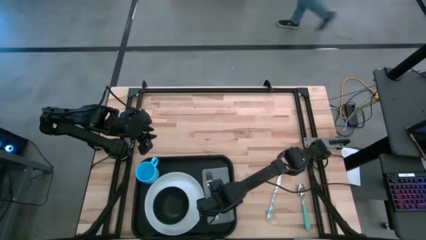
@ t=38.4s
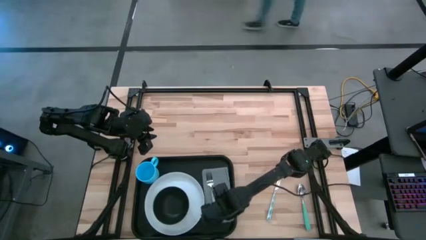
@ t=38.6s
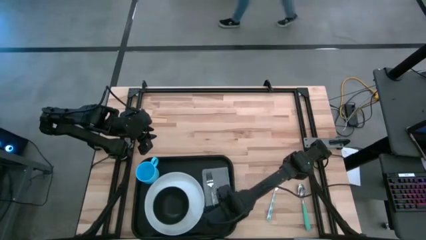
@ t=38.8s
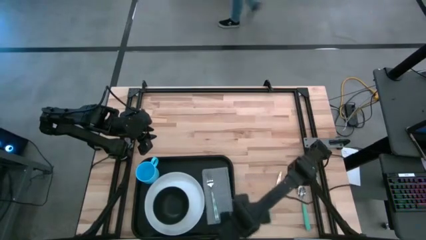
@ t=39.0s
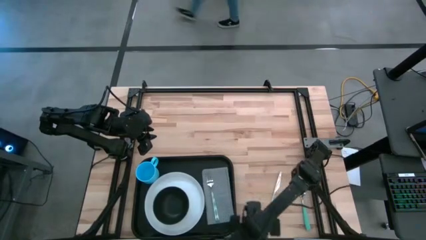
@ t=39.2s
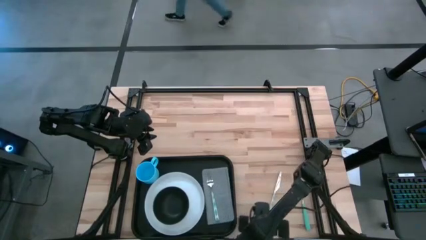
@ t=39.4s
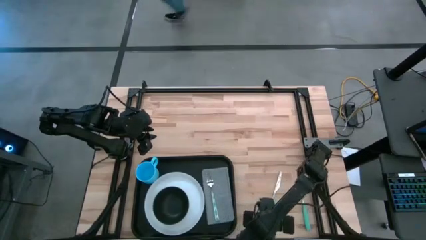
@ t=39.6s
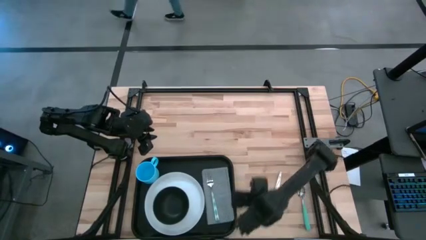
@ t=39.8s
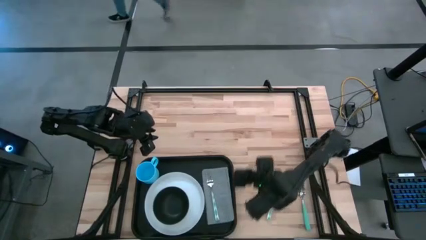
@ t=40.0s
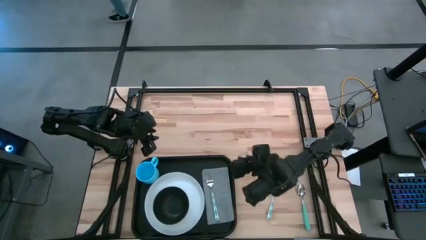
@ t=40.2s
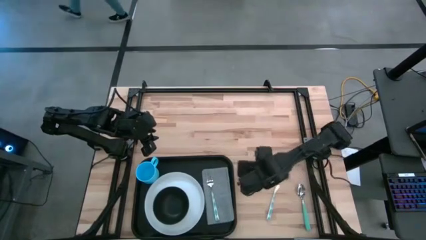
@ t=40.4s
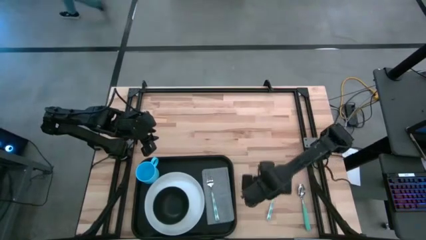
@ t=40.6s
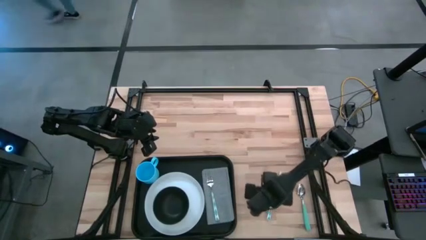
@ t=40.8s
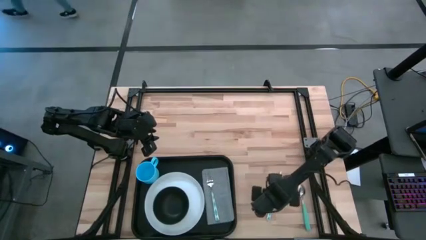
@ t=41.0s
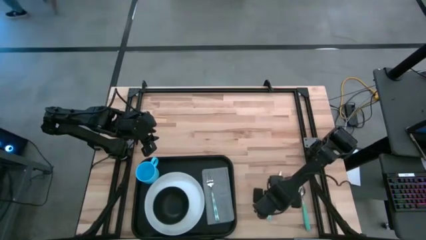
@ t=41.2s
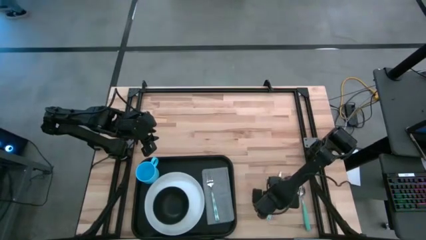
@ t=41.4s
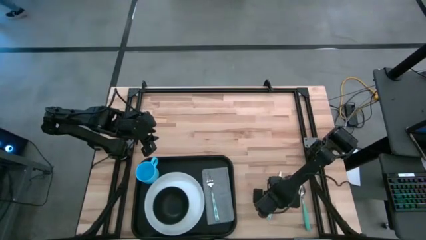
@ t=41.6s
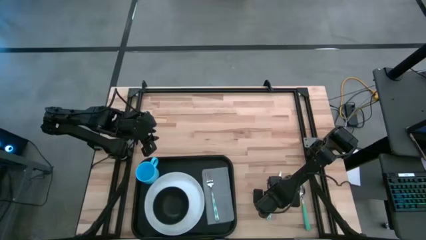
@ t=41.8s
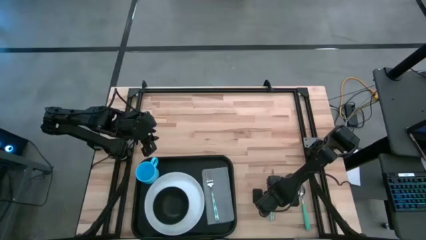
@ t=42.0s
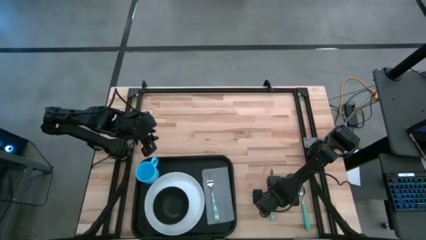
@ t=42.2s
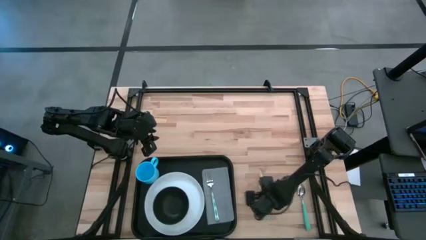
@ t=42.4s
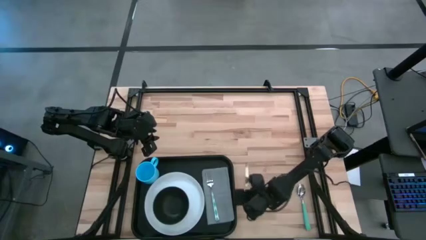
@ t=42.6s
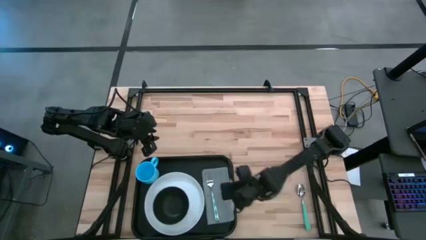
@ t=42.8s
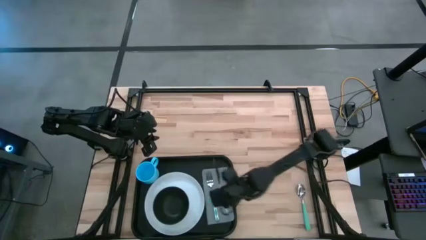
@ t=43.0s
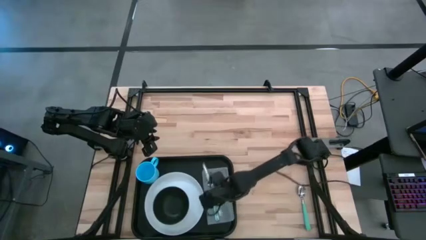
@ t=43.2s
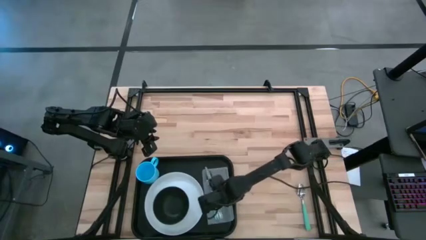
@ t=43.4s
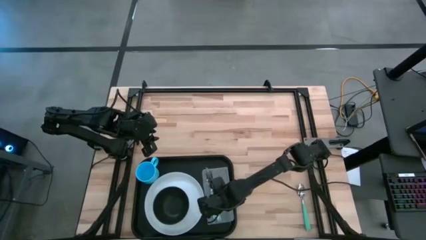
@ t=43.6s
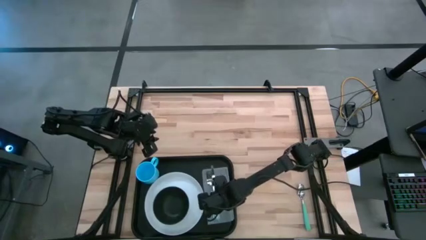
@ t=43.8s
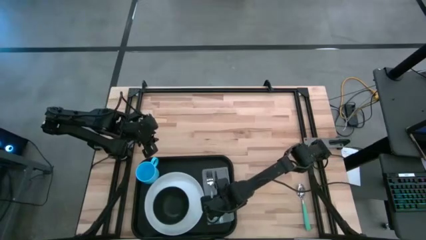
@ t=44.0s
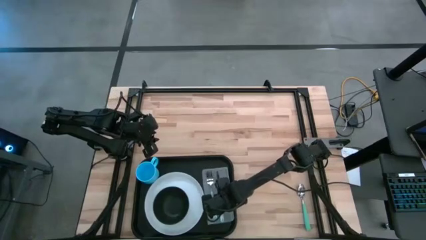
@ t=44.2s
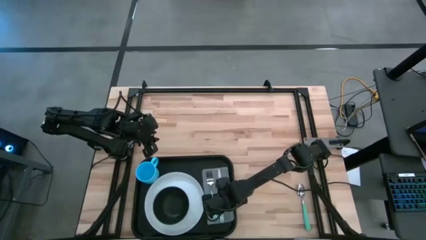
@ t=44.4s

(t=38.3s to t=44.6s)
Task: Set up tray
Put the white green knife on top of the gray napkin to the right of the white green fork

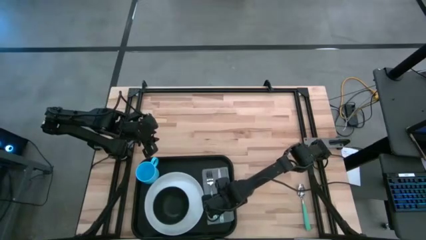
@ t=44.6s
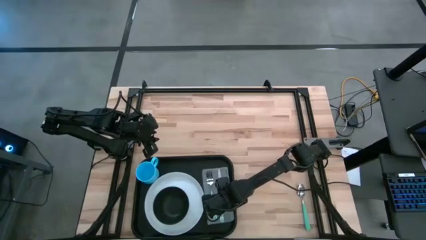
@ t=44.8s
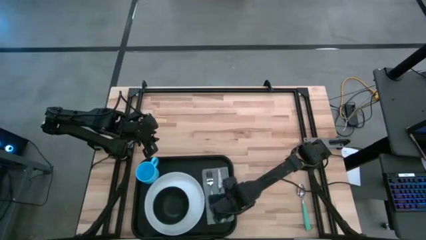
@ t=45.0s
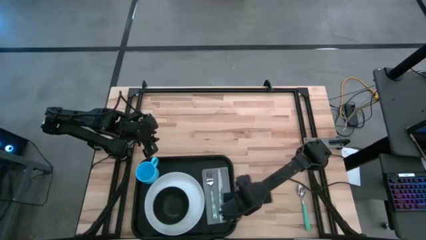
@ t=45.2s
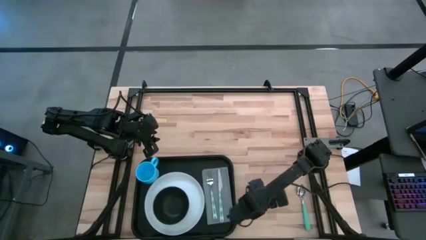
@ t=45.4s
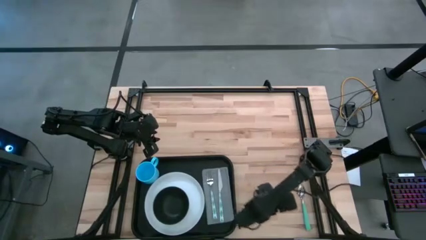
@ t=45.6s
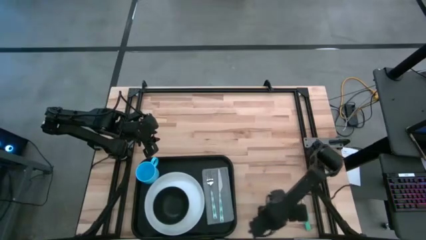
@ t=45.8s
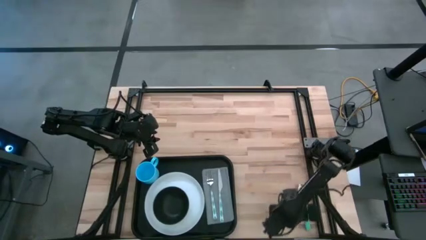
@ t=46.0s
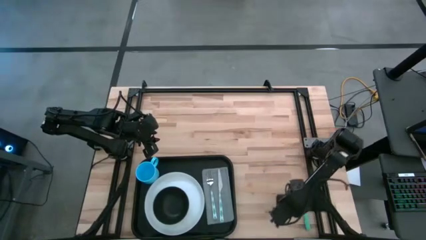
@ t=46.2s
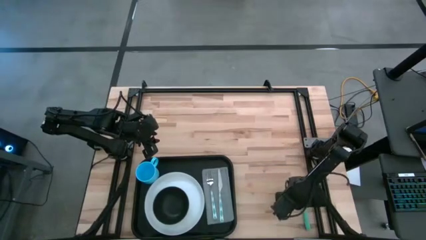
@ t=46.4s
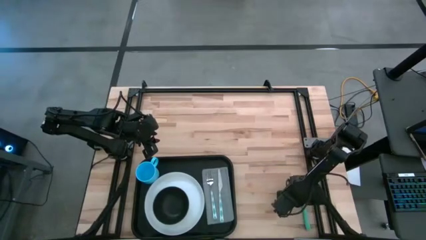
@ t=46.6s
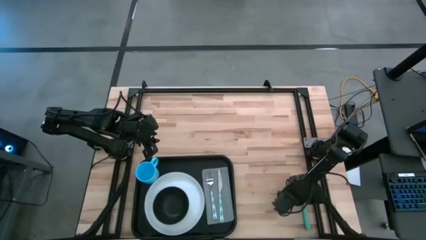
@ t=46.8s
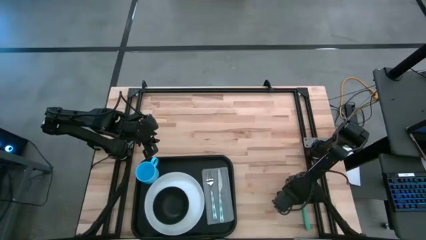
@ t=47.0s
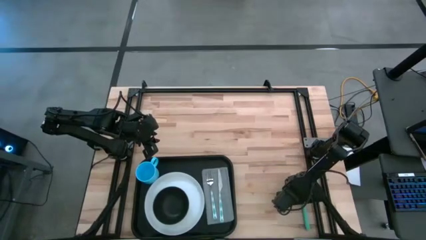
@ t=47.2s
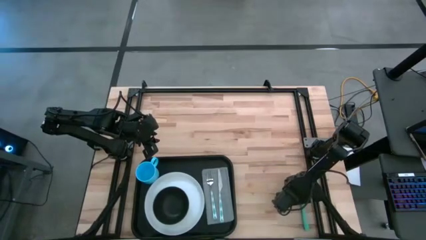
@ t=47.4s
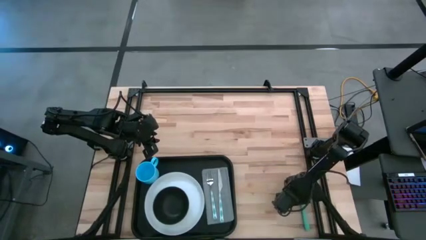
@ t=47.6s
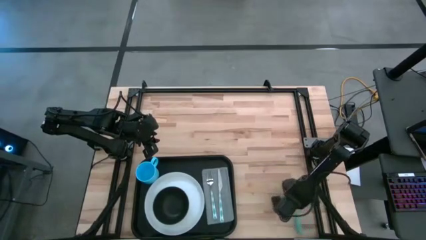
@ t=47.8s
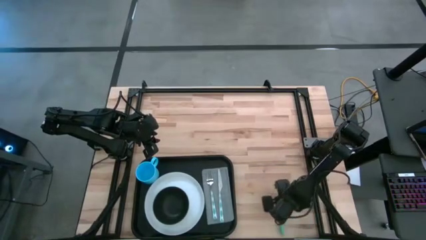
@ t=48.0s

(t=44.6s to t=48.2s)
Put the green spoon on top of the gray napkin to the right of the white green knife

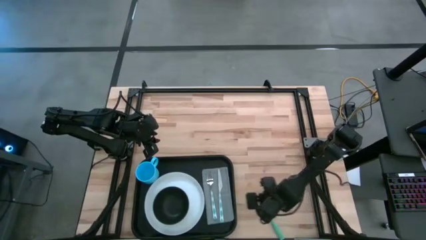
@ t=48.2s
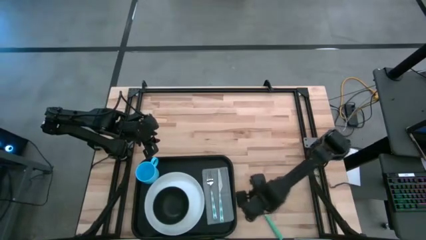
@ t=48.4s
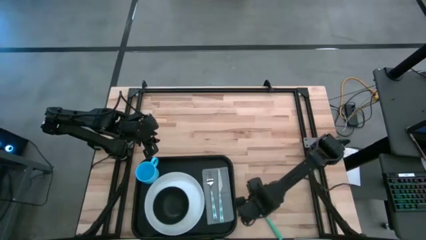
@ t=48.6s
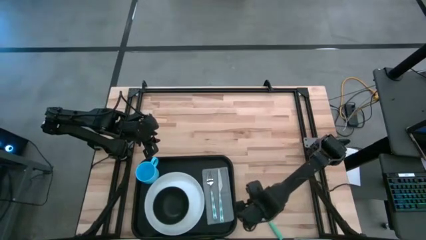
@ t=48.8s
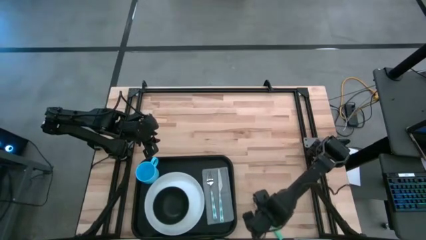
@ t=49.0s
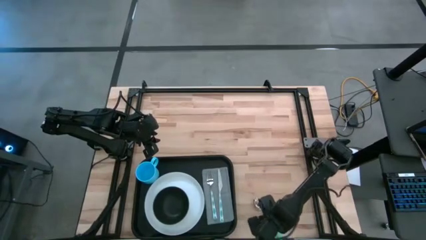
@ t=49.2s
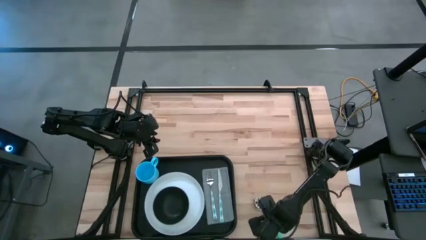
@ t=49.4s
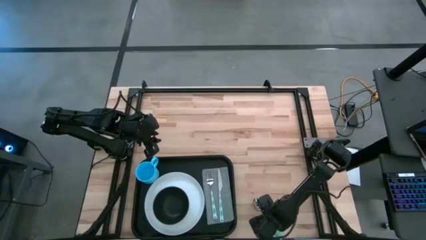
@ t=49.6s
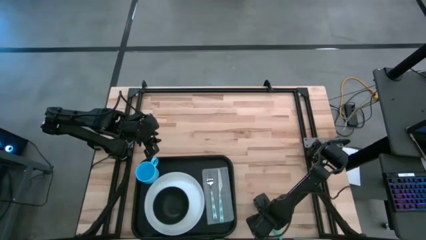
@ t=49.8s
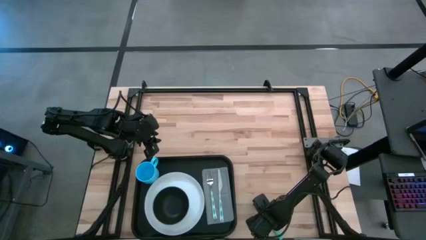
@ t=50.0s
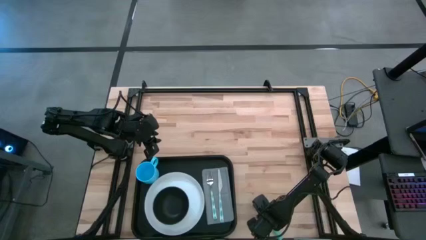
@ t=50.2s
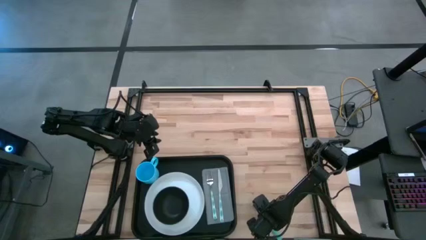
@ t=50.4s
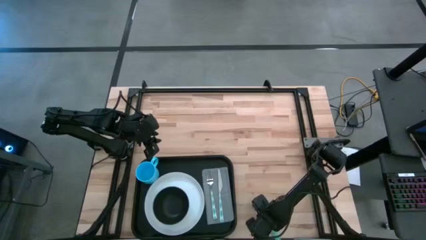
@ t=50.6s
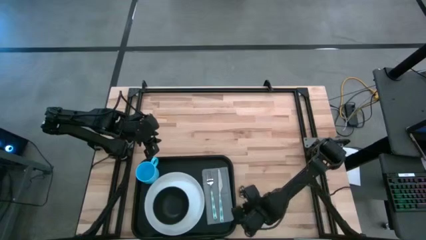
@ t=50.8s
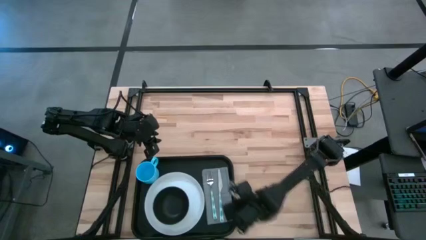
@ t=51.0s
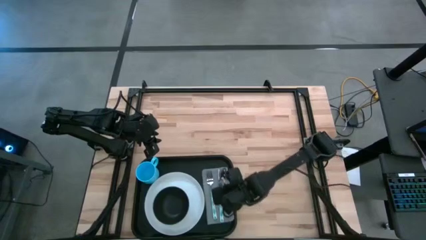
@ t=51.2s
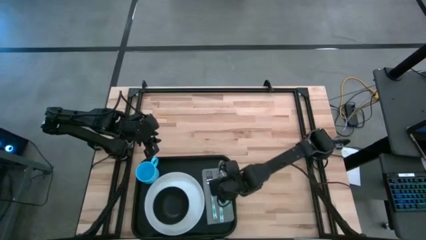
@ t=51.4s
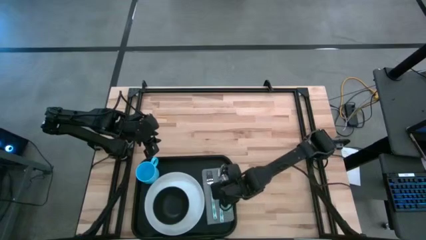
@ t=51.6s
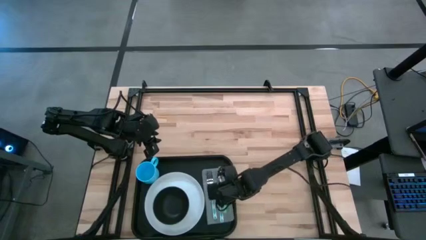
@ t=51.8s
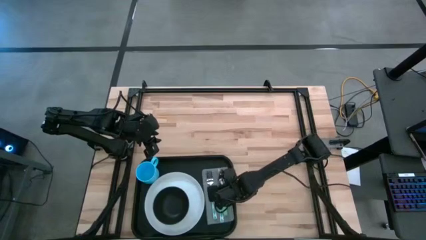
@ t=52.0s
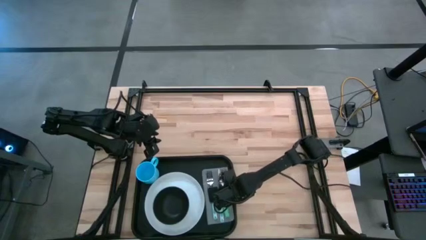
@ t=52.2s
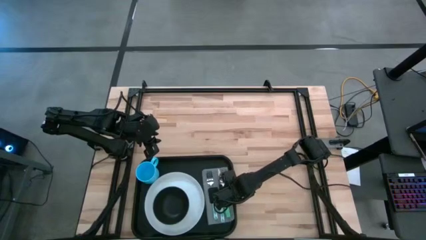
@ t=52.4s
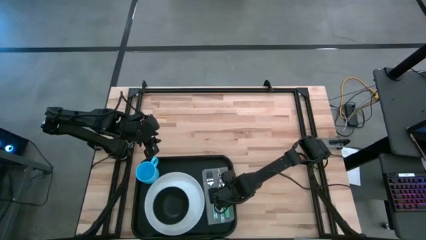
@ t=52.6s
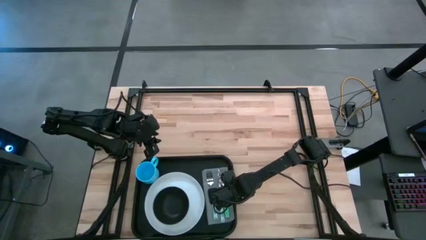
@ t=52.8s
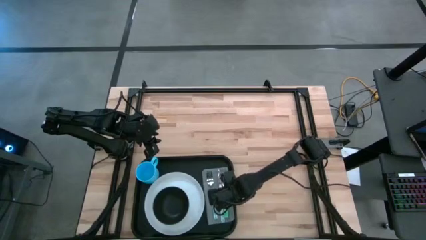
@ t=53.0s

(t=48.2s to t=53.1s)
Put the green spoon on top of the gray napkin to the right of the white green knife

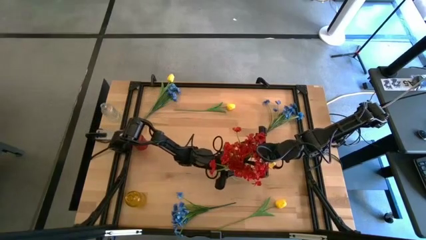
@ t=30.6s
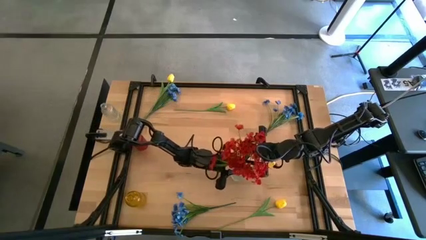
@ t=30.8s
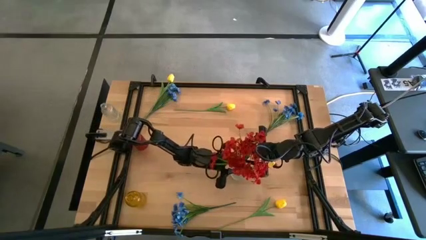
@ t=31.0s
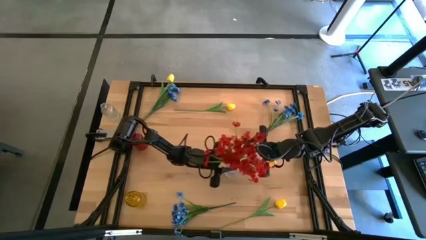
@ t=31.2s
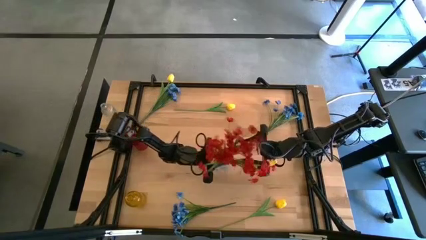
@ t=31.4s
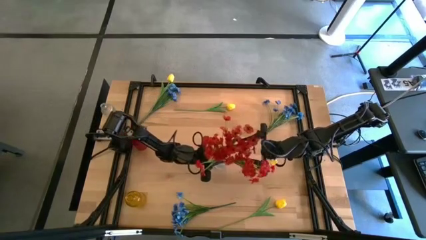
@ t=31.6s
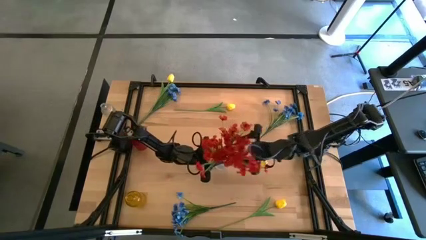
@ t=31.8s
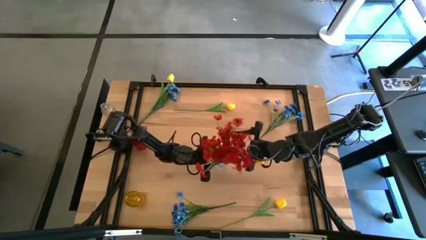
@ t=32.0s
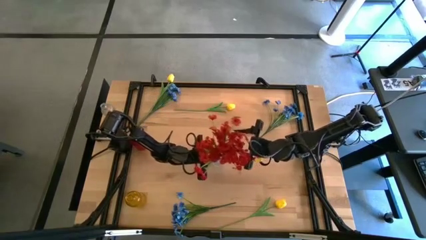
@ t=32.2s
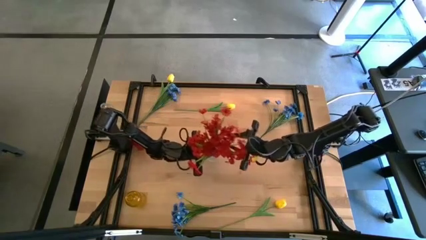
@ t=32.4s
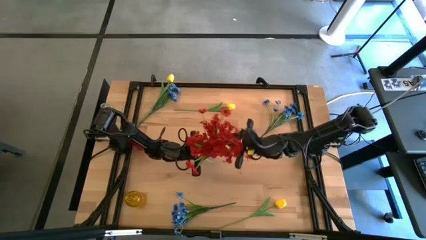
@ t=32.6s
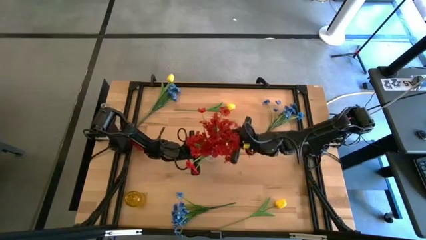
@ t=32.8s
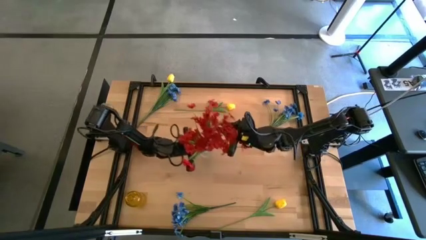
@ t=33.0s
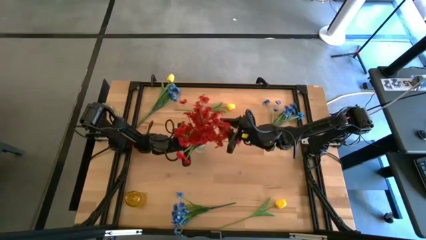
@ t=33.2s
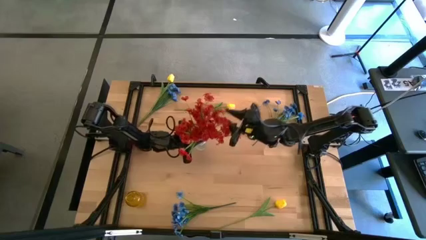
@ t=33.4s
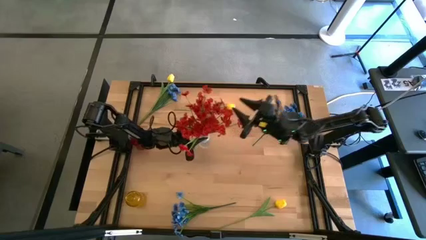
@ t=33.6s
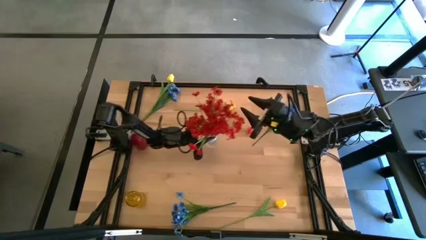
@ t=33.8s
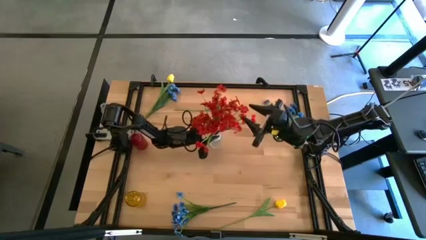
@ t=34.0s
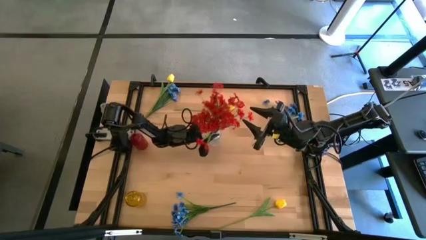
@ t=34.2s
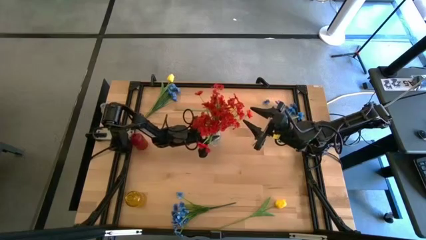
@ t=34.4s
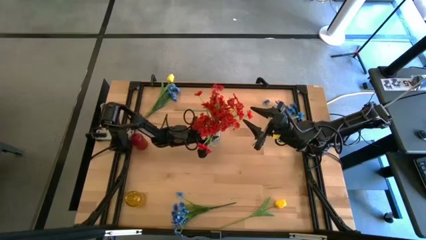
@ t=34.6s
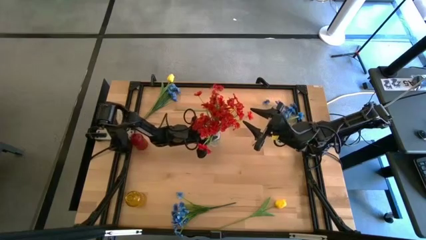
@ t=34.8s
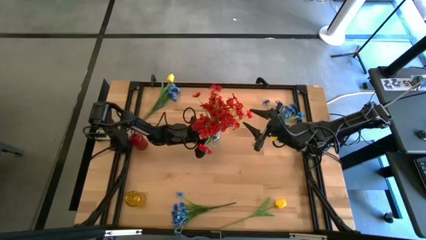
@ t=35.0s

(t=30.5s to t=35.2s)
Task: Sort flowers into vase by color
Move the transparent vase to the center of the table
